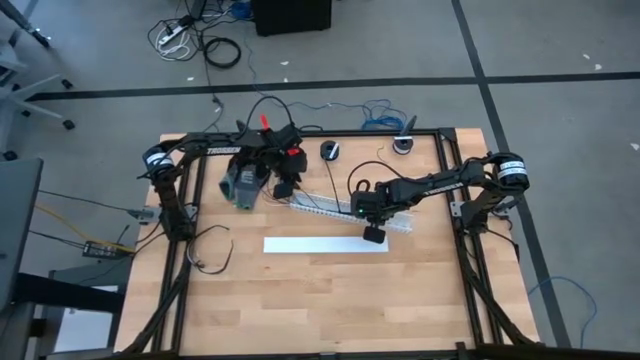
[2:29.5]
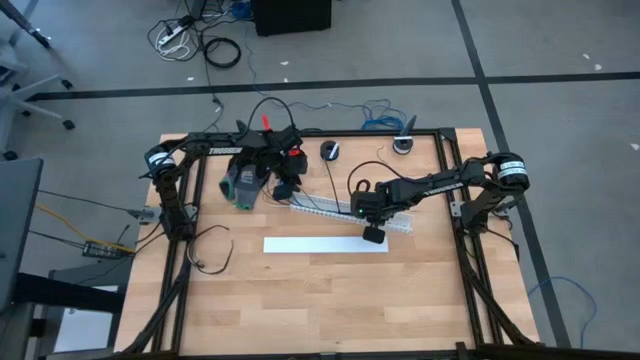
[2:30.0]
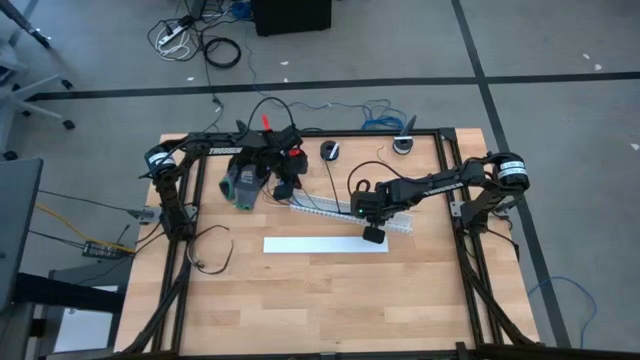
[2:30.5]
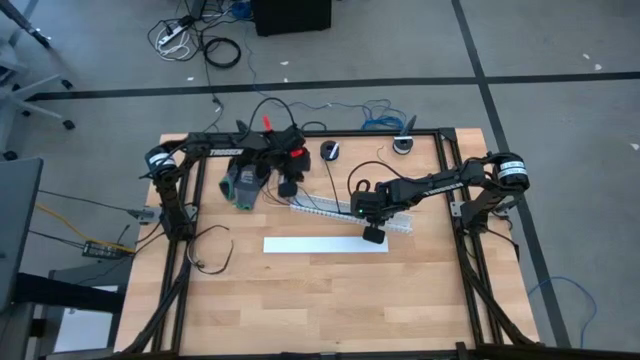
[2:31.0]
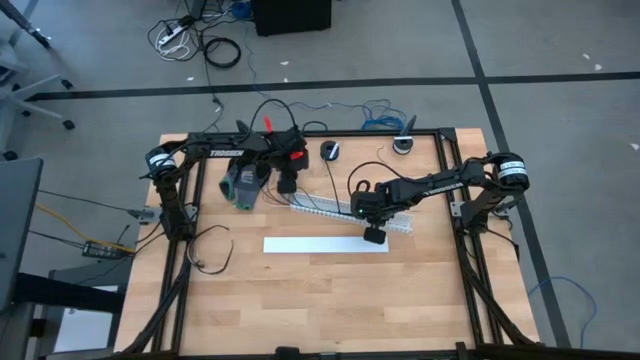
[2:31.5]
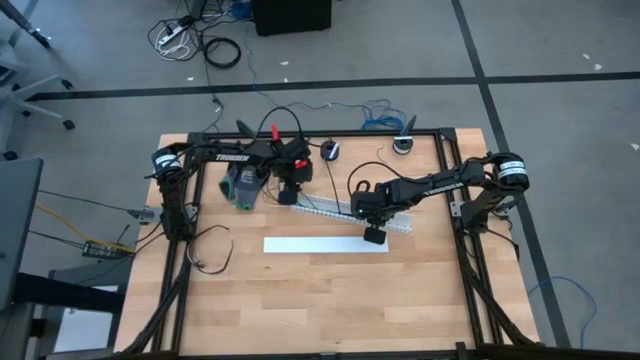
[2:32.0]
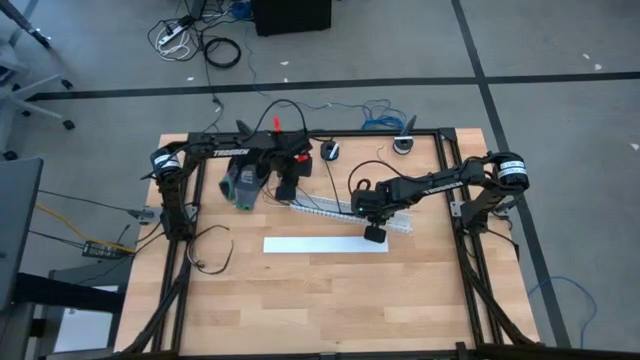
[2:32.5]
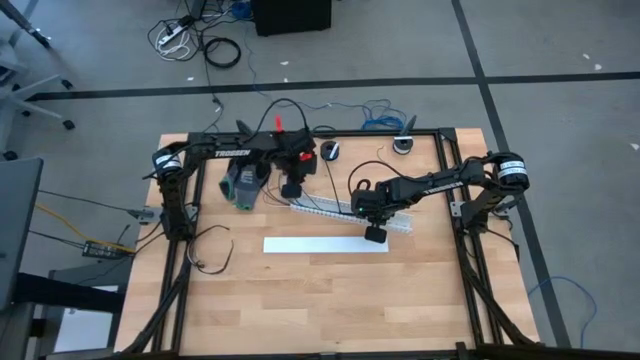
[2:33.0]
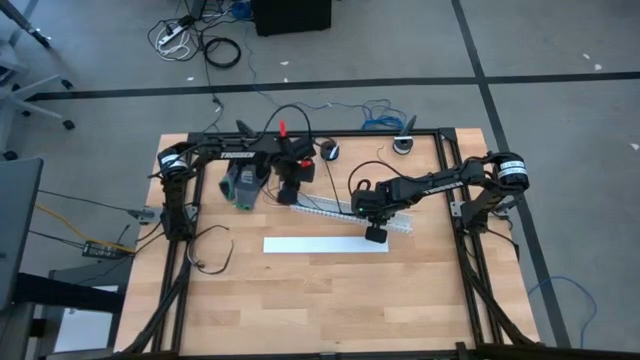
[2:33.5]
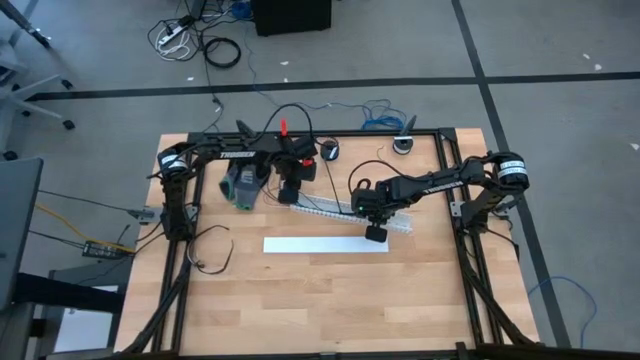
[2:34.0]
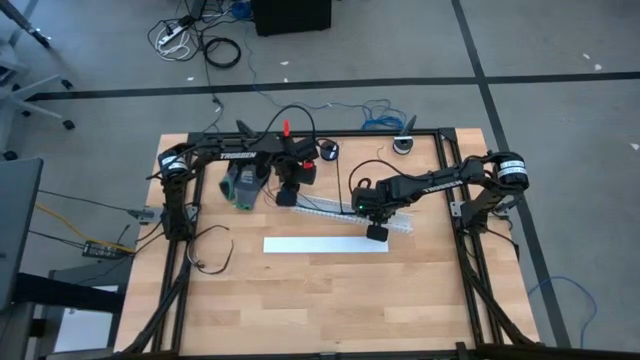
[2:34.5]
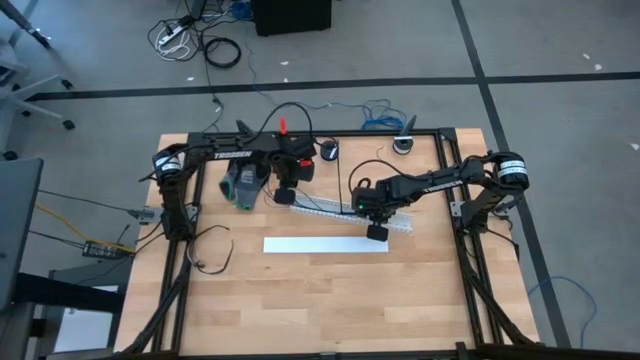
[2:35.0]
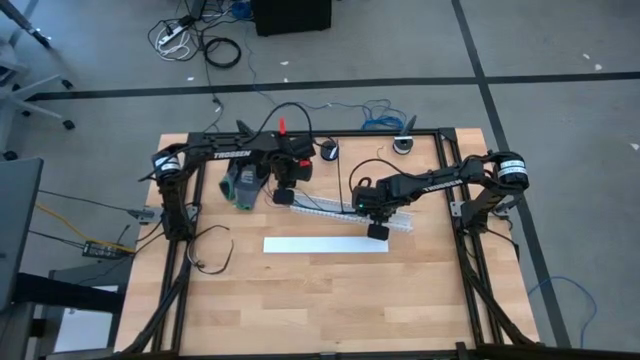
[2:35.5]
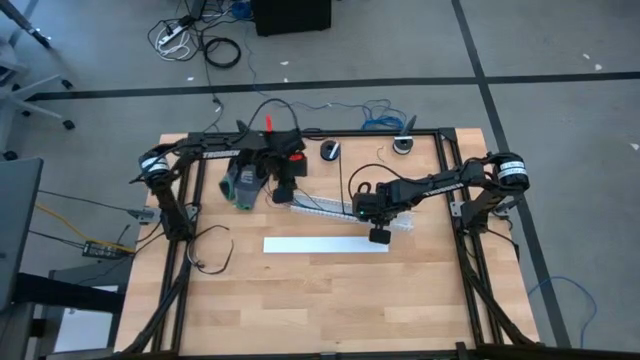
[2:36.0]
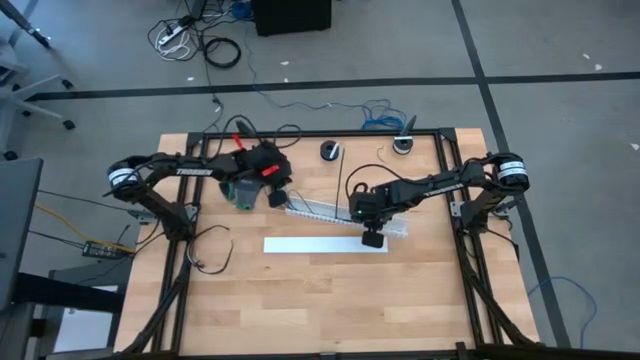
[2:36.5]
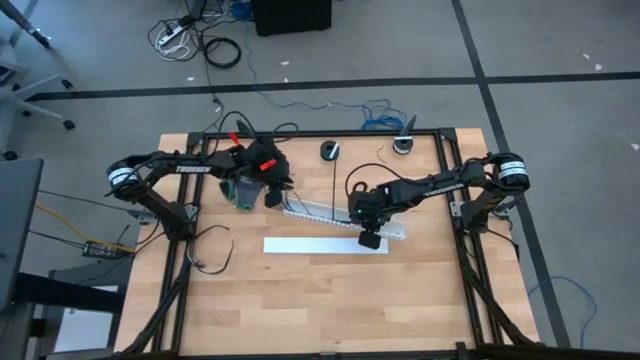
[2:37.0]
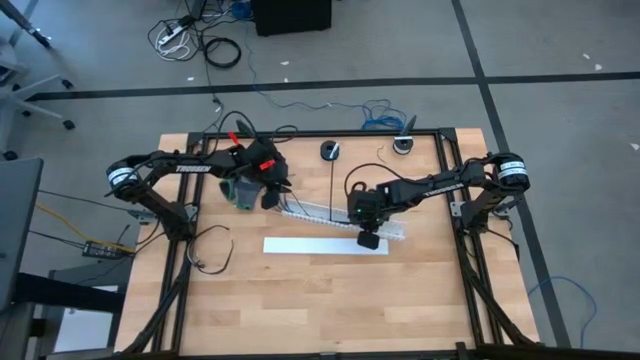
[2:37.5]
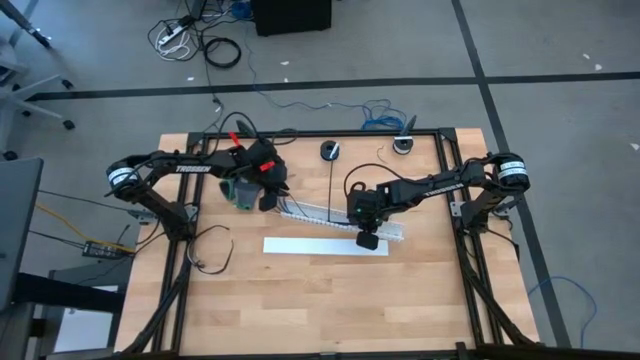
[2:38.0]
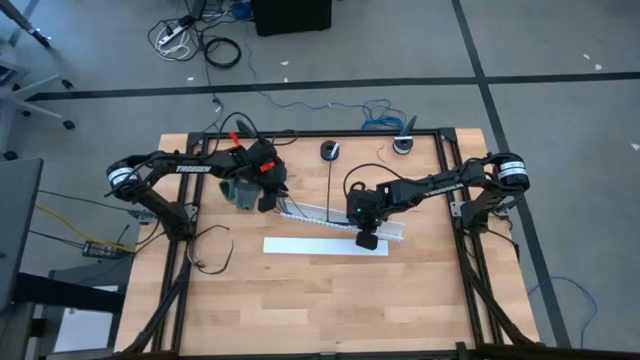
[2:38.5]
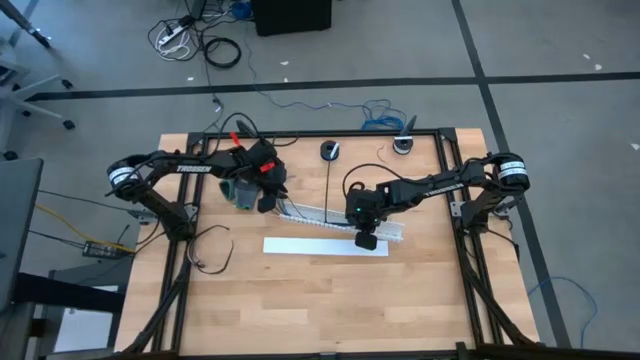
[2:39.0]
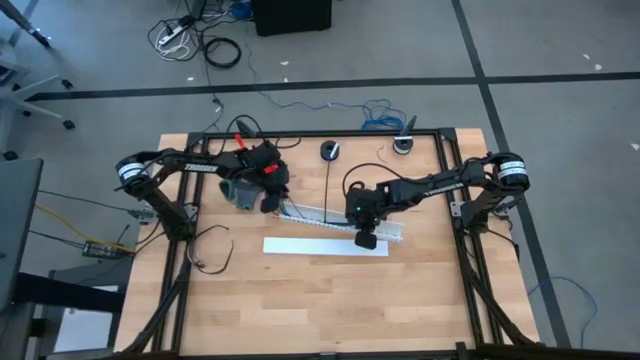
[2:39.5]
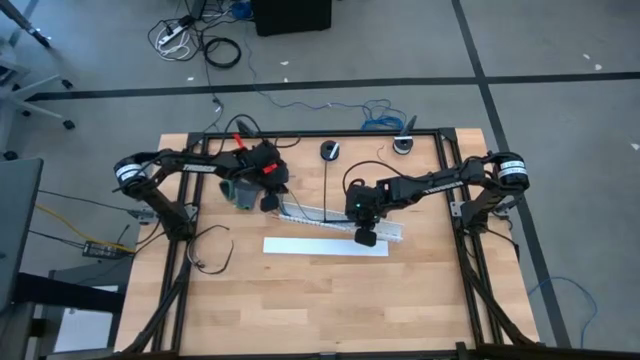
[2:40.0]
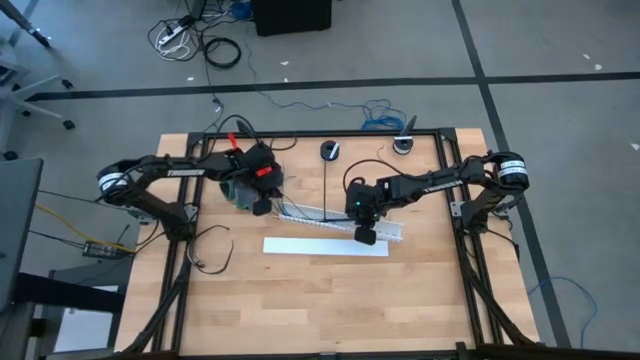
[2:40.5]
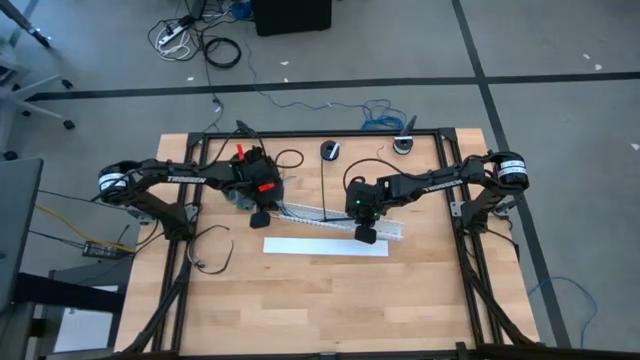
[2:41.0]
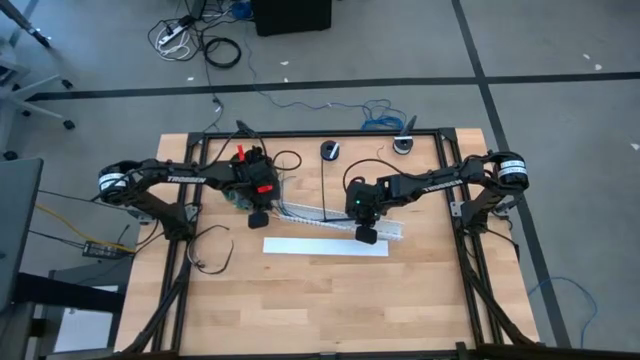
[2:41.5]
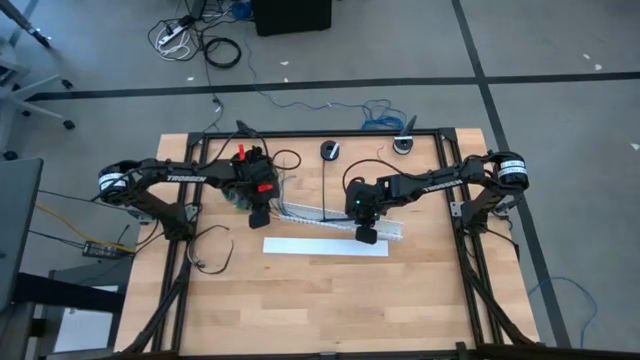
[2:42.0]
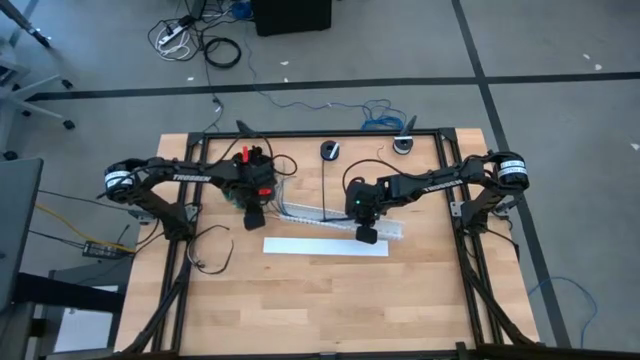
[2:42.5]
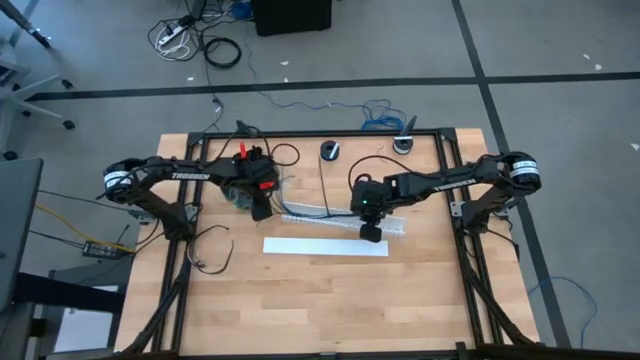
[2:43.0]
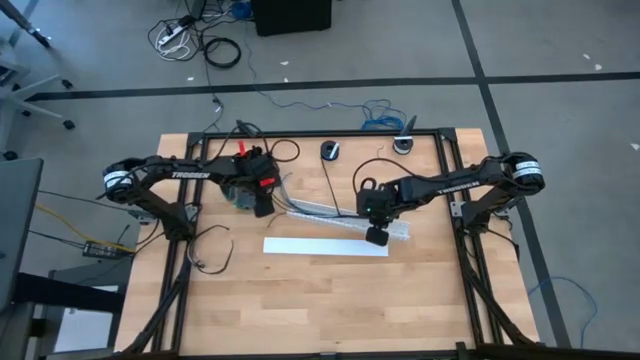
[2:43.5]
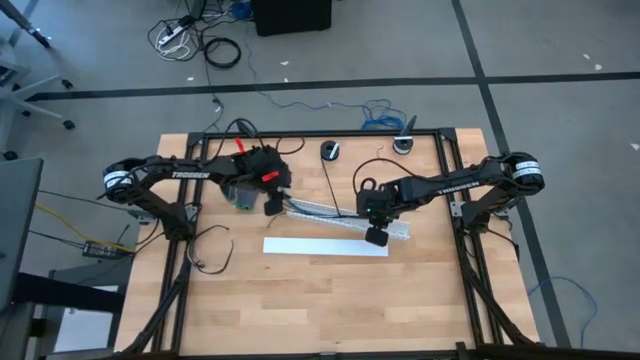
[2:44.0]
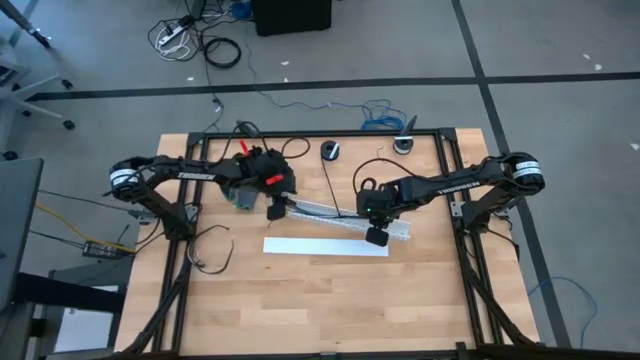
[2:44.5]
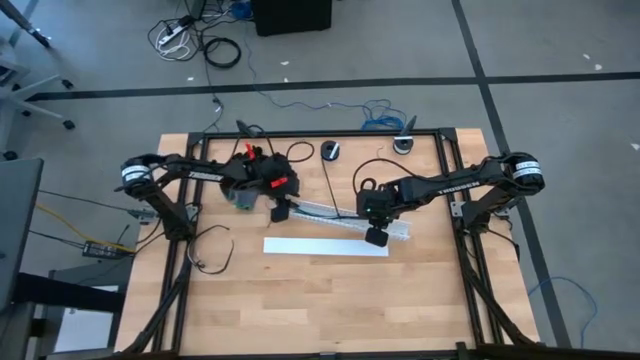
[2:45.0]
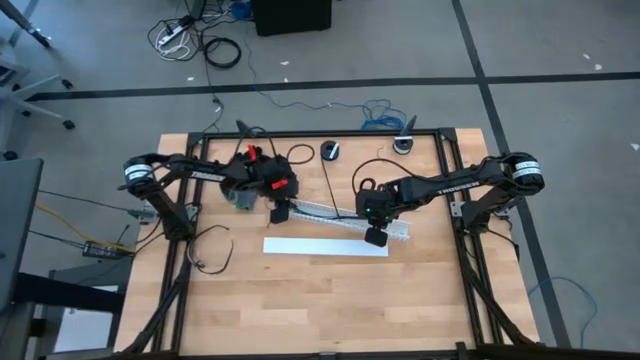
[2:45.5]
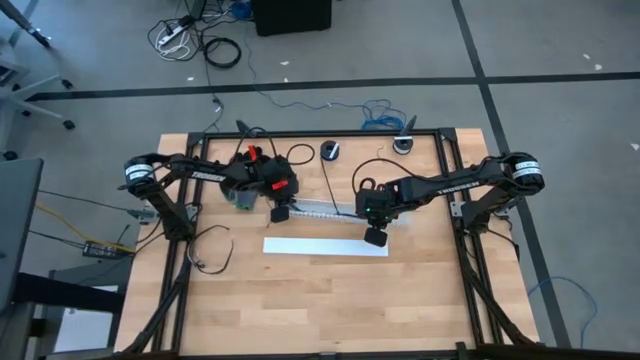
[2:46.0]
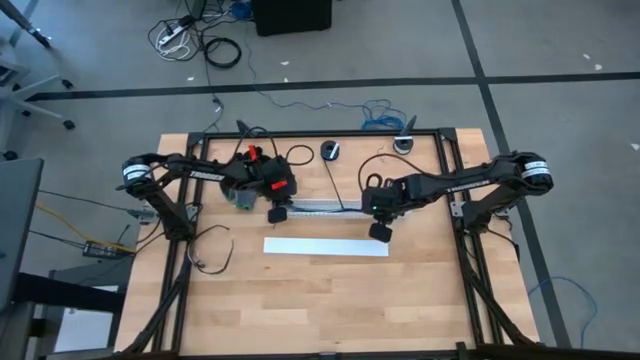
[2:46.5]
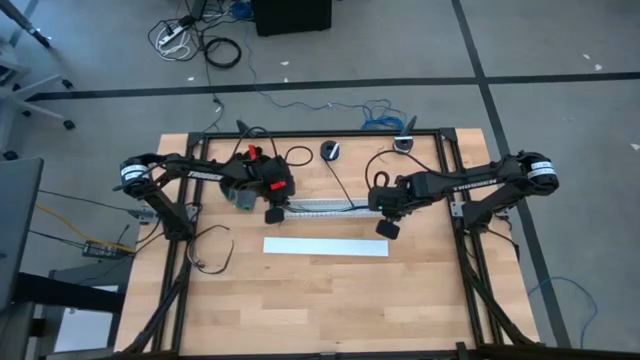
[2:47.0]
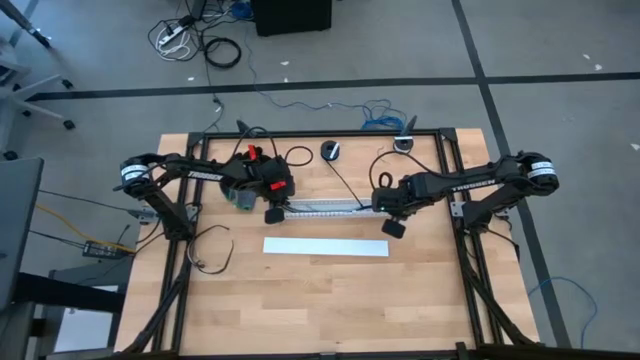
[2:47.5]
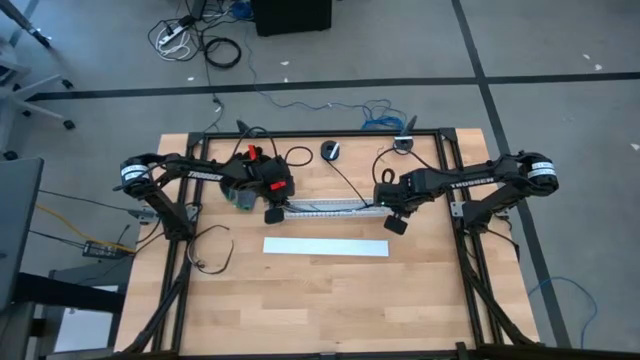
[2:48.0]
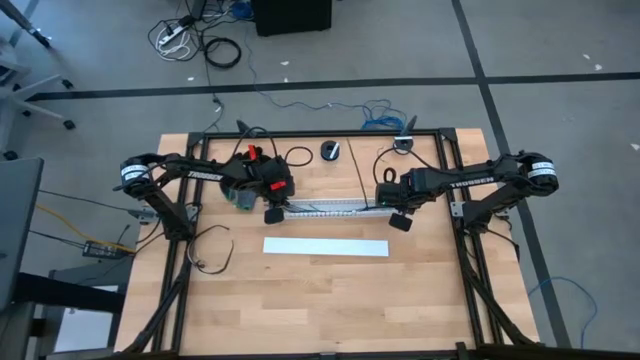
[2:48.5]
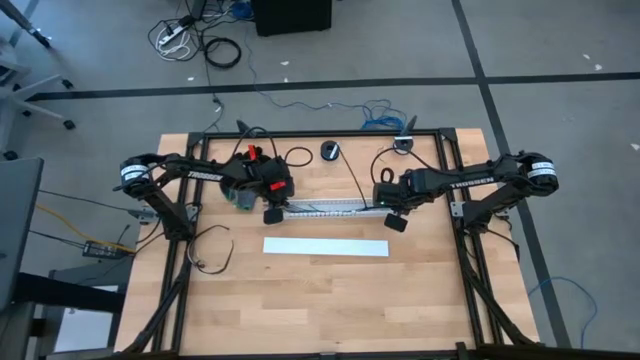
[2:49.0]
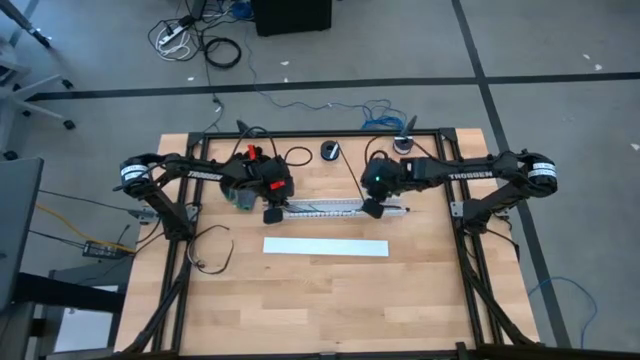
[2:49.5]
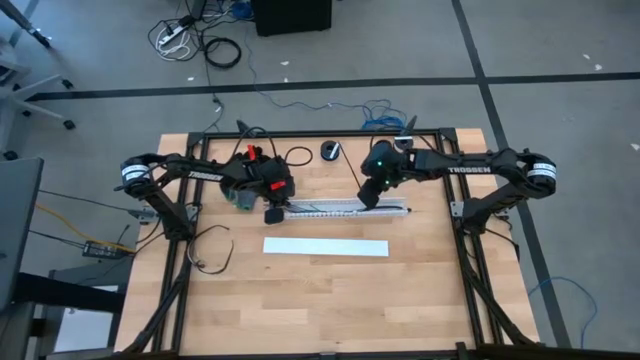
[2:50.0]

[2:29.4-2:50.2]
Task: Ziptie cables
Put the ziptied cables into the white cable duct
